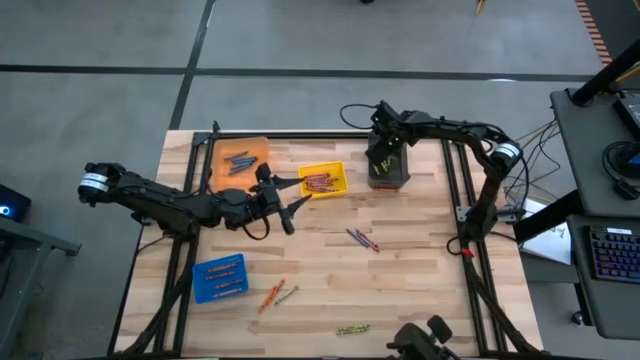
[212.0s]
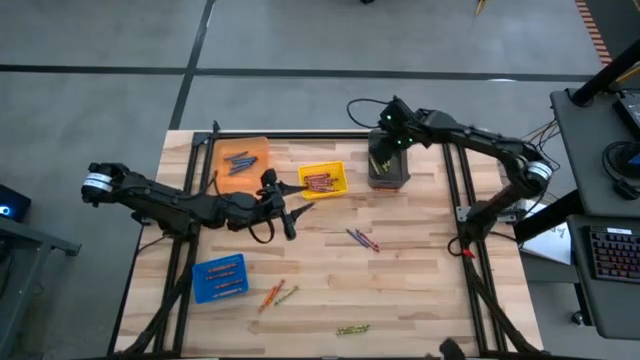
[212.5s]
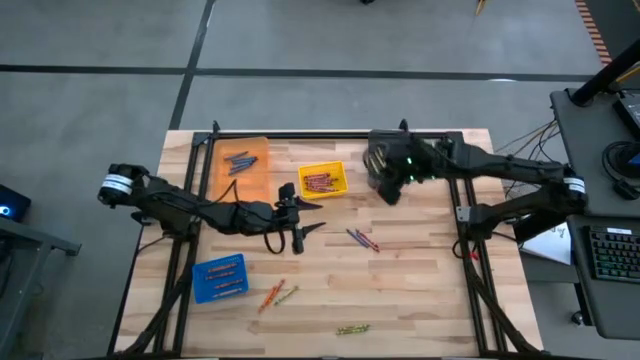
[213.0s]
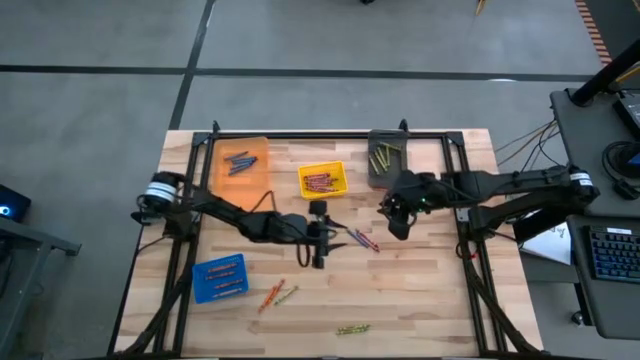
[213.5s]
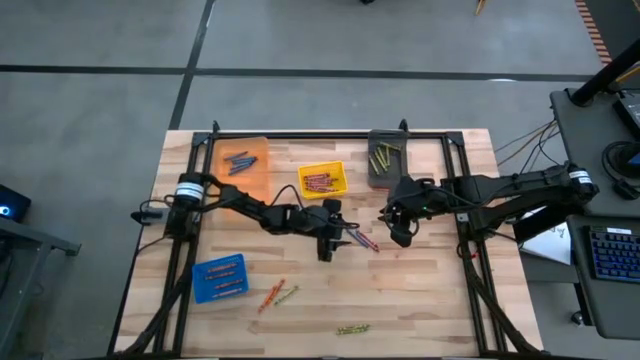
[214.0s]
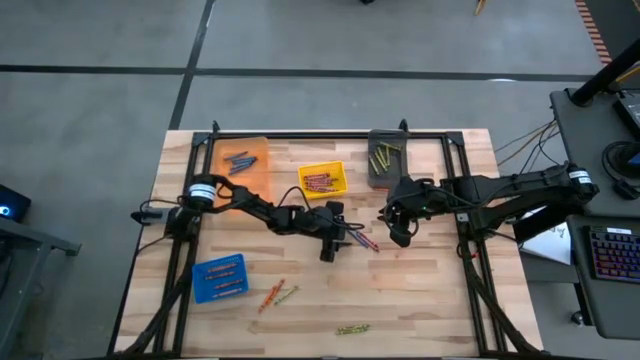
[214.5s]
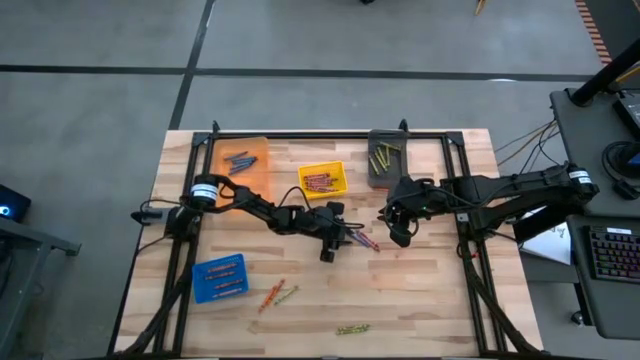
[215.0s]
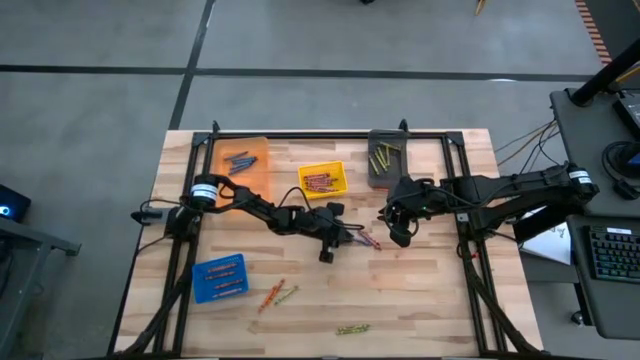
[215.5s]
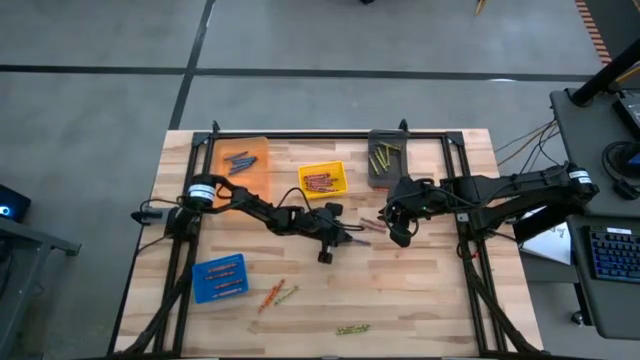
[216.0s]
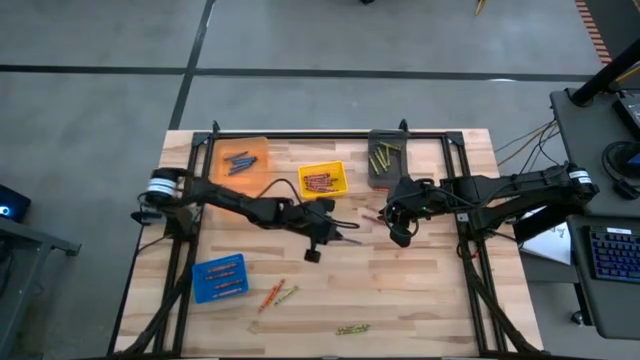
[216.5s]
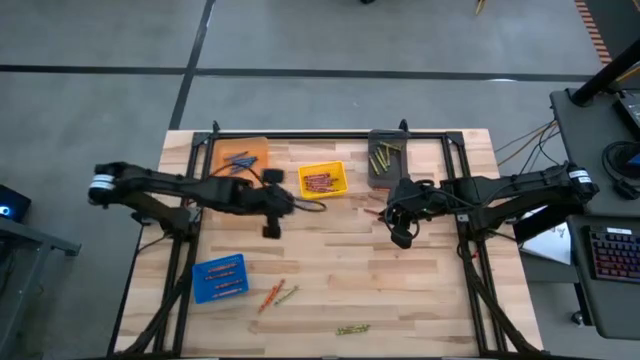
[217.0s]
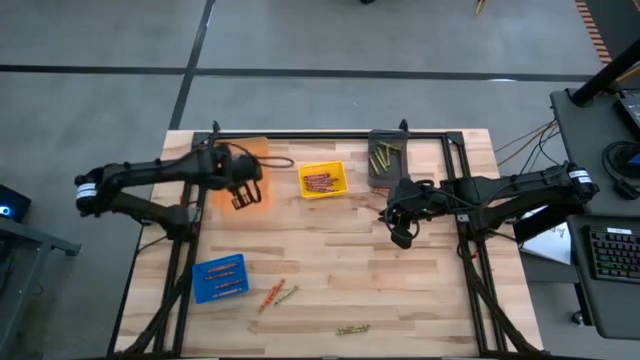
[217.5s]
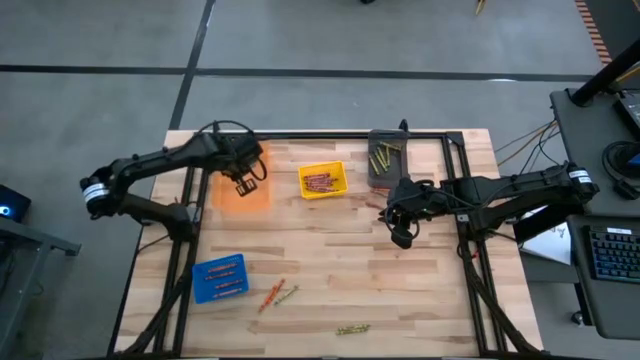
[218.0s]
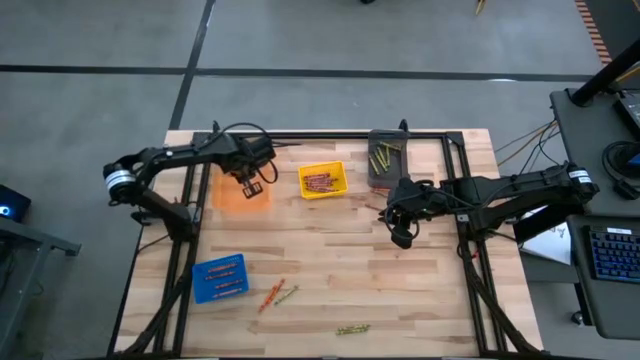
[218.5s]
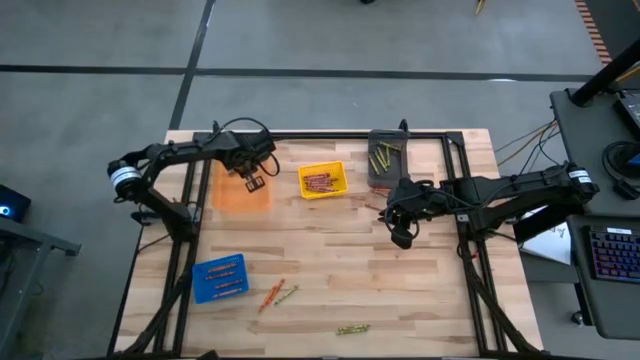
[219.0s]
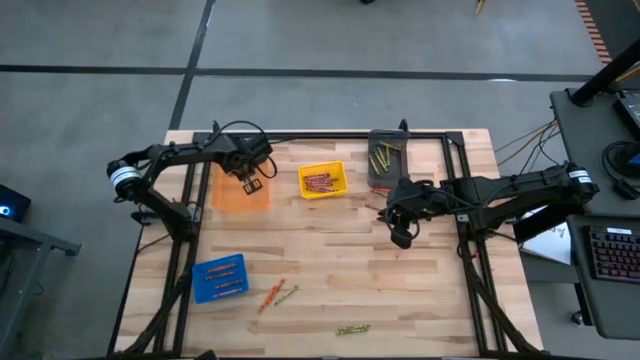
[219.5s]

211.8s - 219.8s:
Task: Sort crayons
Put the blue crayon into the orange bin

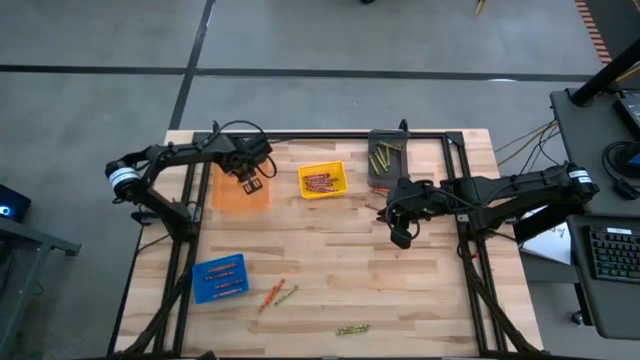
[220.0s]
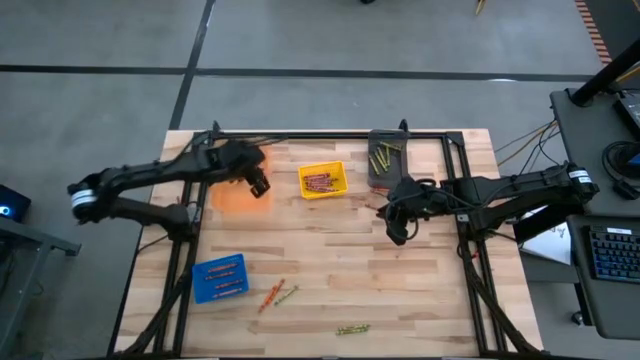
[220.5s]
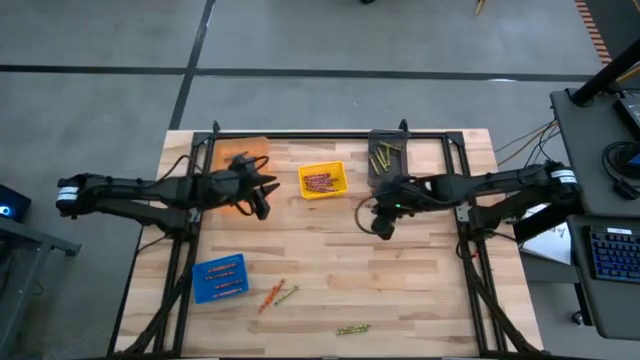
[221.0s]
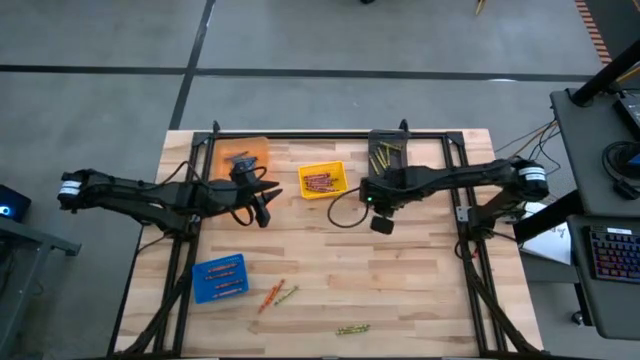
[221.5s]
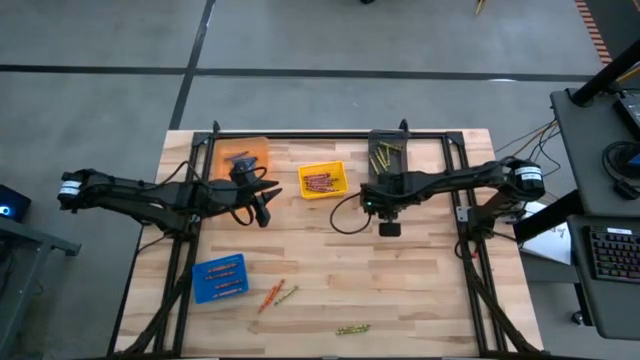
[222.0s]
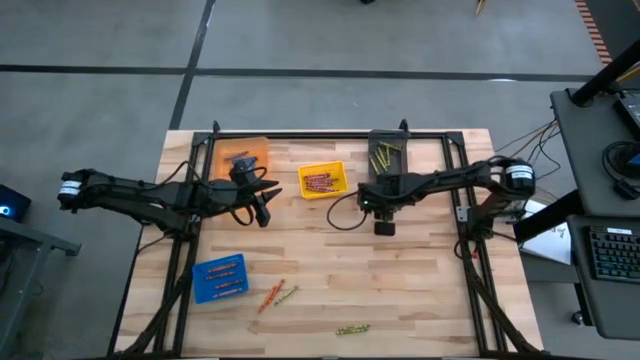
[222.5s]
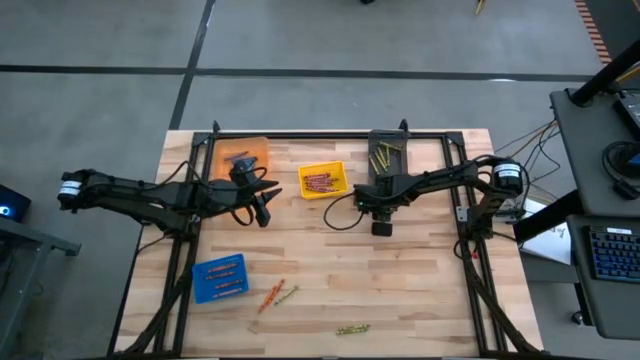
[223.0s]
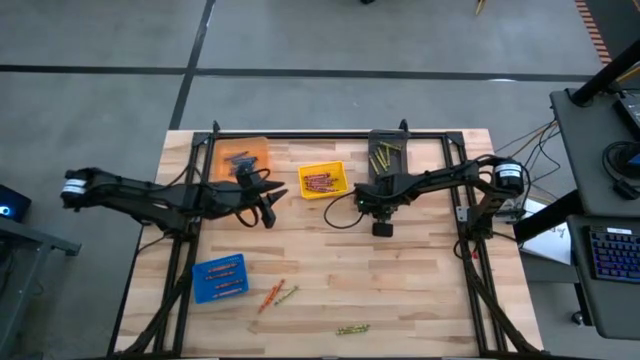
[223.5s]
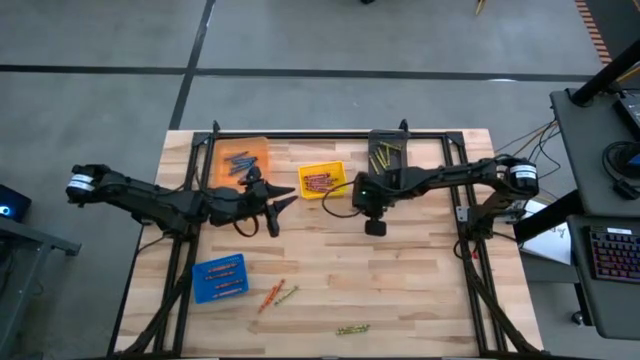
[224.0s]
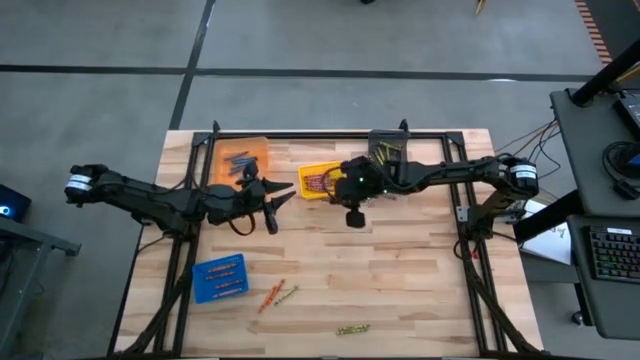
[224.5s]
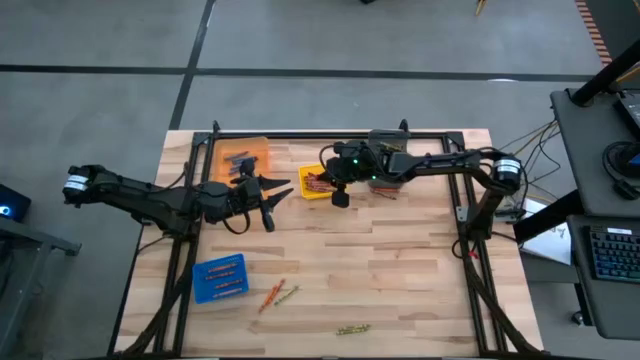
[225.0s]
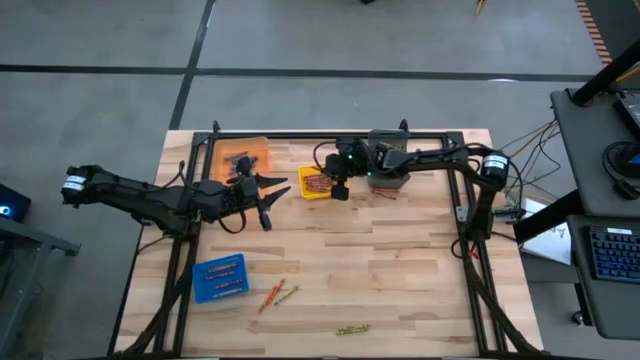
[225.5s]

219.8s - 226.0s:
Put the red crayon into the yellow bin

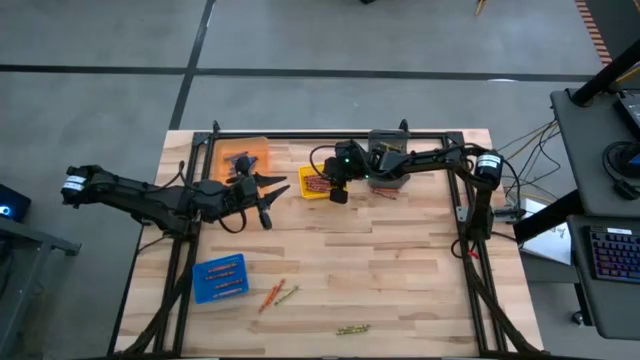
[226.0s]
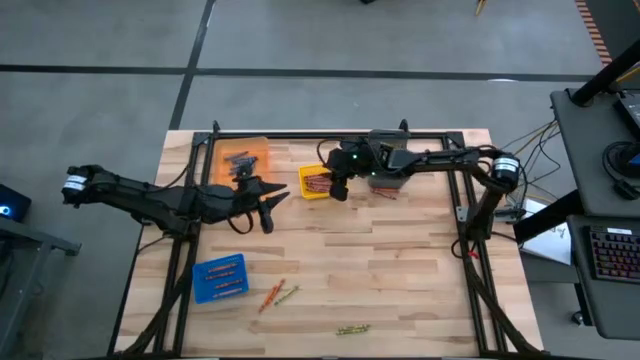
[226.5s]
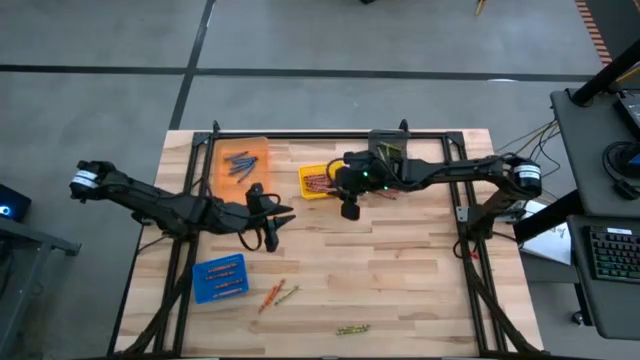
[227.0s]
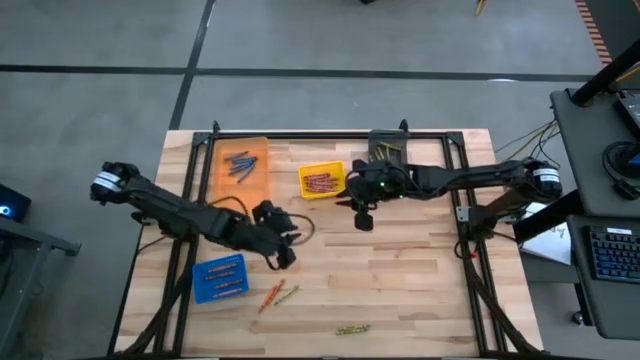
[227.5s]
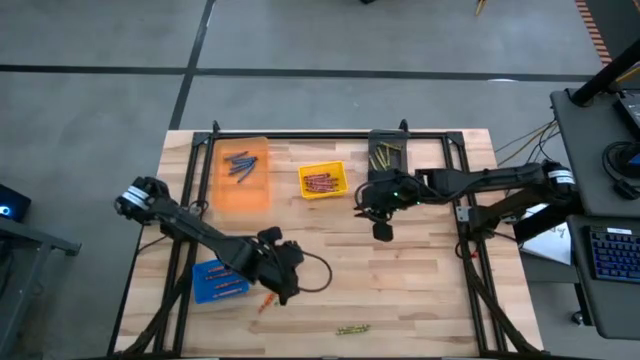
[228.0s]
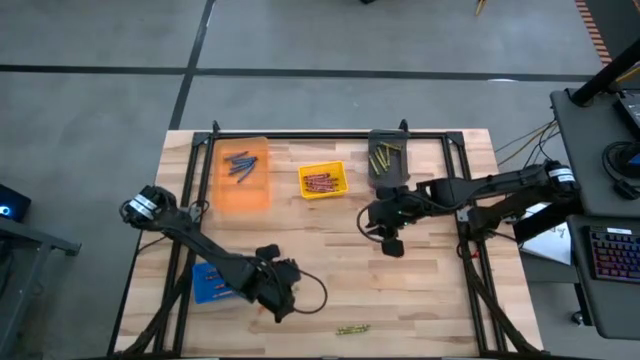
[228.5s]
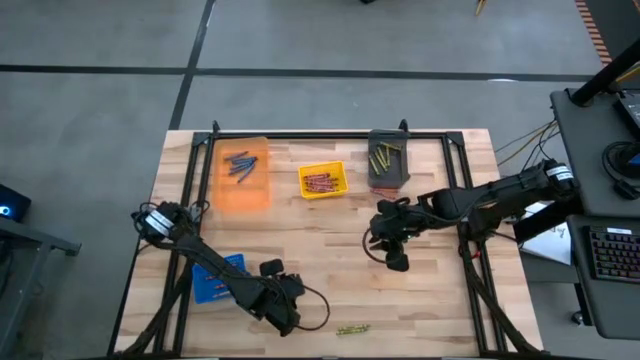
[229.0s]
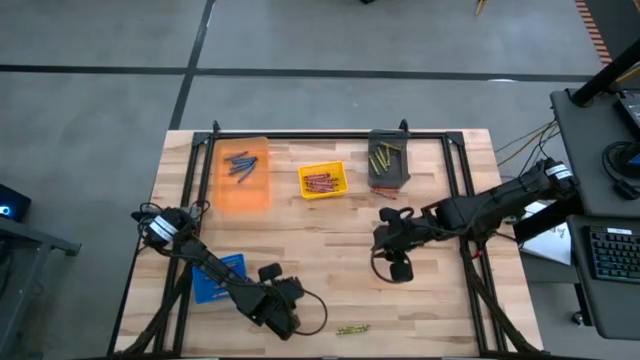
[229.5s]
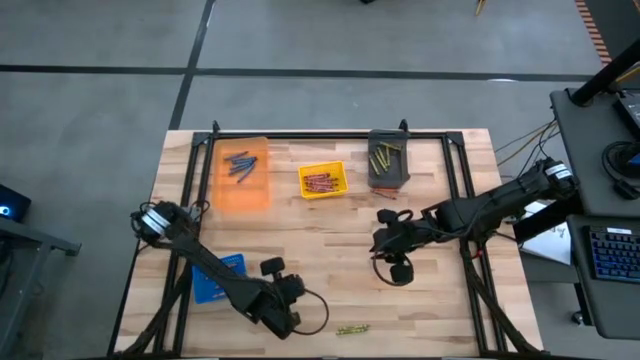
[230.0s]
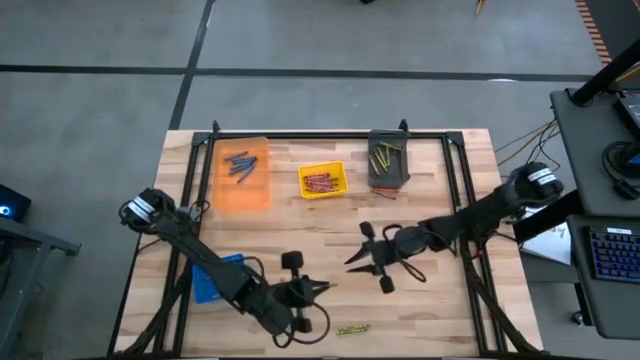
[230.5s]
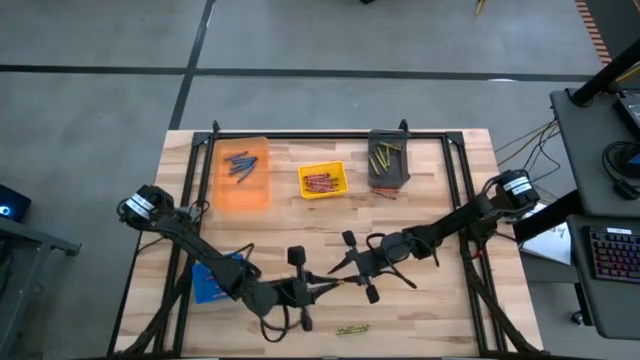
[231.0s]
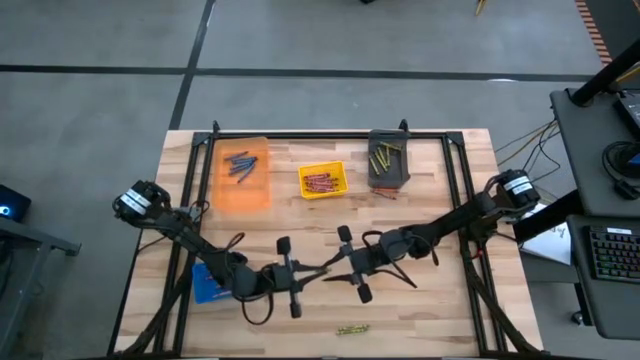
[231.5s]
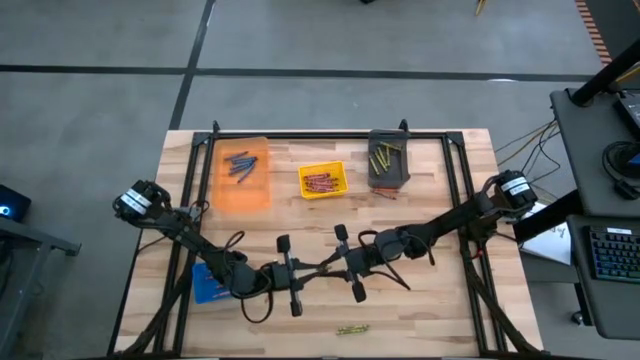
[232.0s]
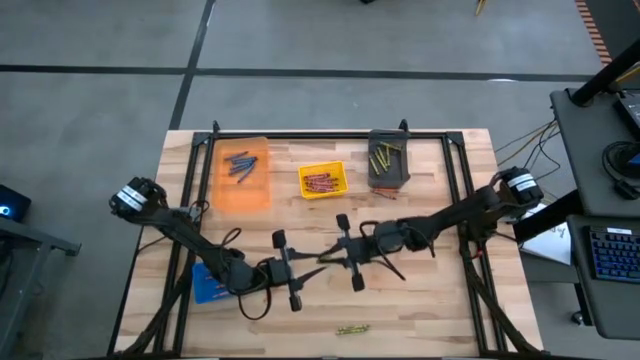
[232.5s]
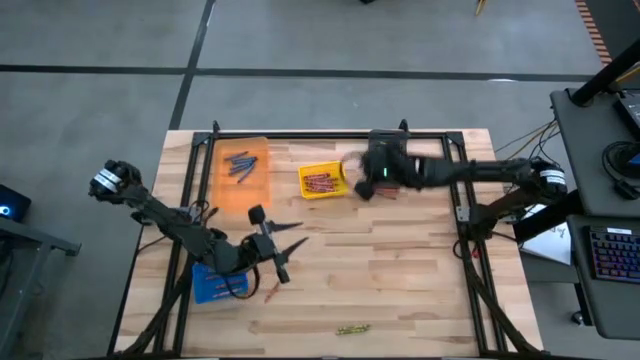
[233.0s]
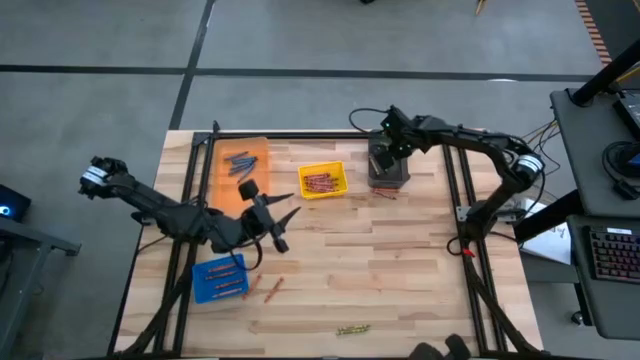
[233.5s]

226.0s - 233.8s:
Put the green crayon into the black bin
